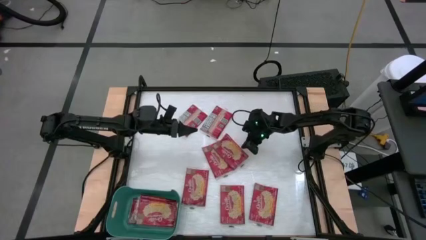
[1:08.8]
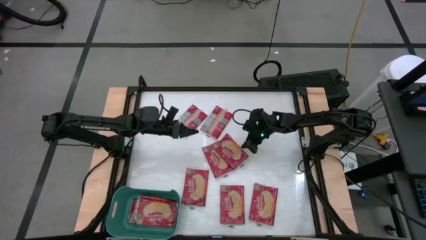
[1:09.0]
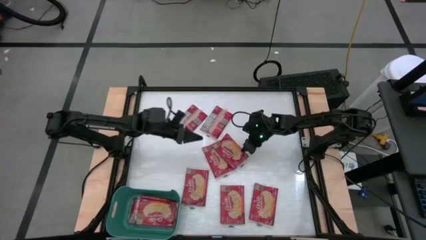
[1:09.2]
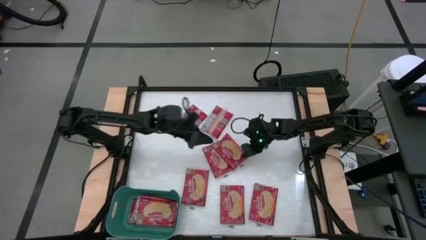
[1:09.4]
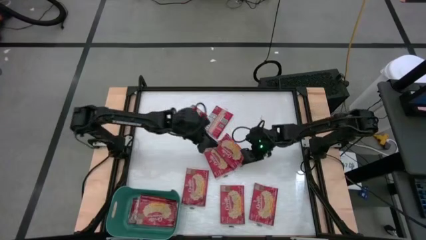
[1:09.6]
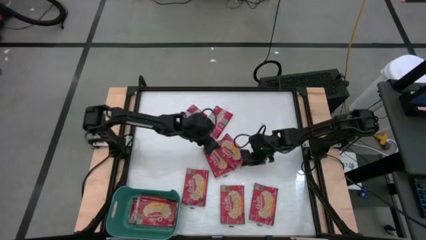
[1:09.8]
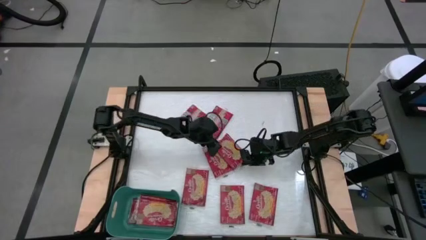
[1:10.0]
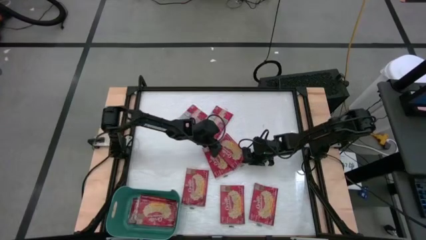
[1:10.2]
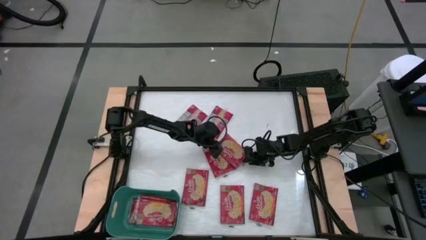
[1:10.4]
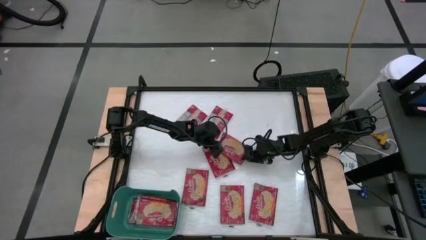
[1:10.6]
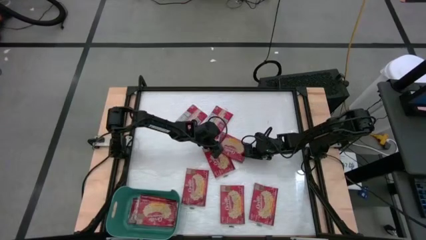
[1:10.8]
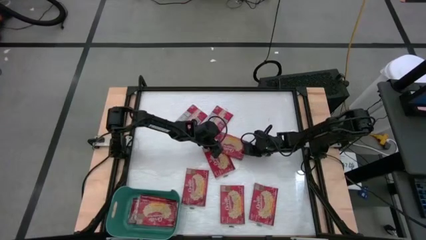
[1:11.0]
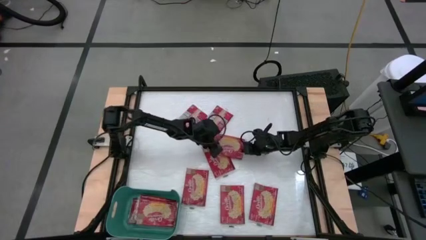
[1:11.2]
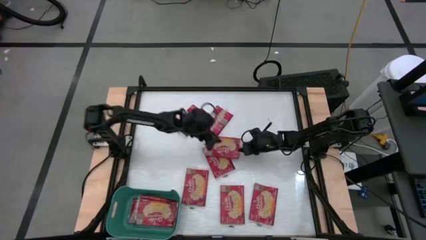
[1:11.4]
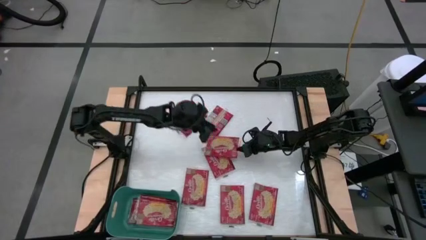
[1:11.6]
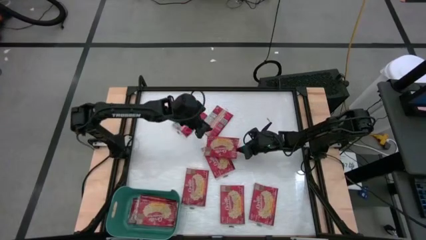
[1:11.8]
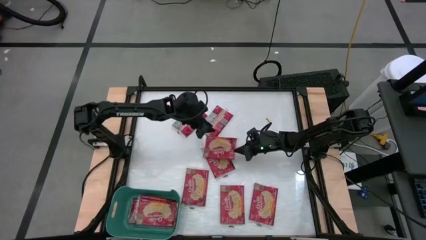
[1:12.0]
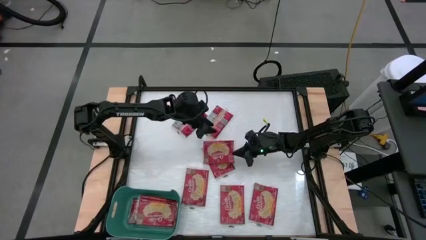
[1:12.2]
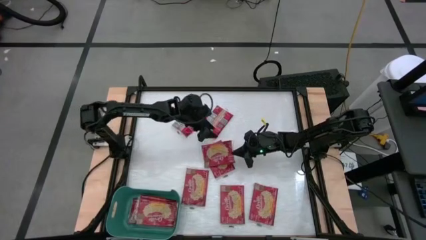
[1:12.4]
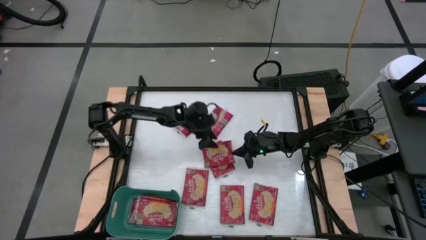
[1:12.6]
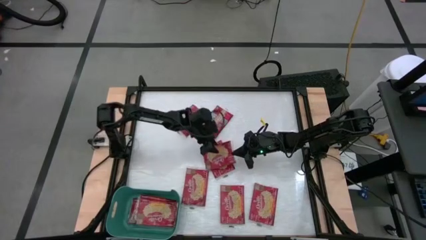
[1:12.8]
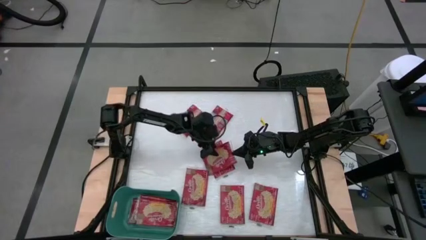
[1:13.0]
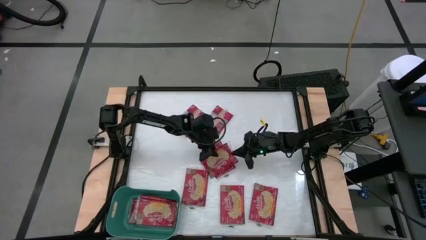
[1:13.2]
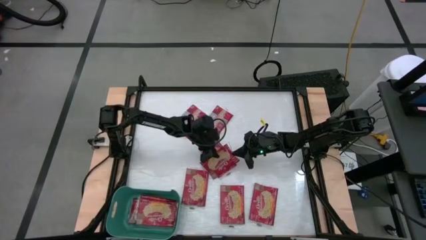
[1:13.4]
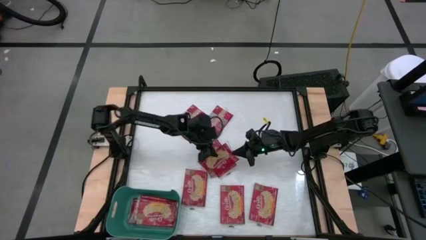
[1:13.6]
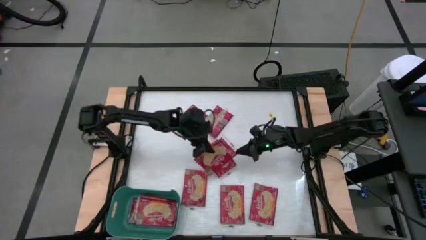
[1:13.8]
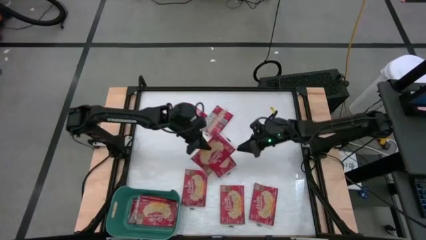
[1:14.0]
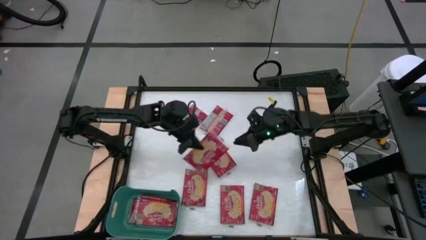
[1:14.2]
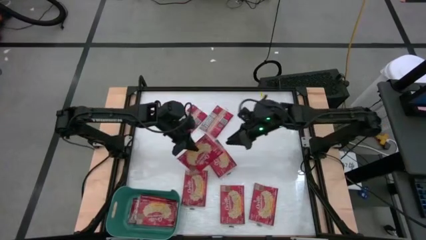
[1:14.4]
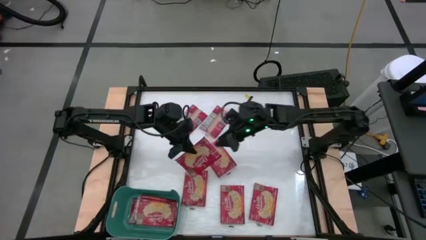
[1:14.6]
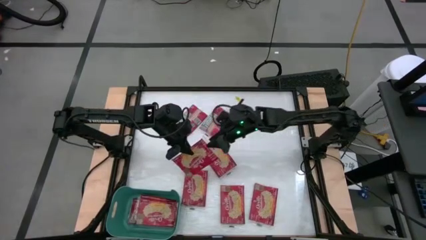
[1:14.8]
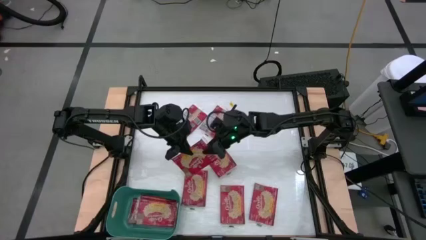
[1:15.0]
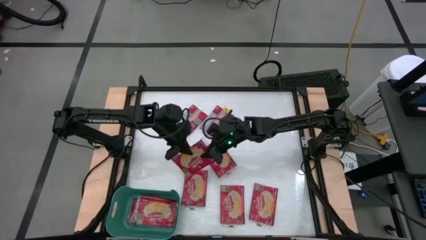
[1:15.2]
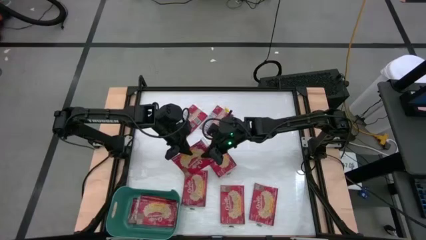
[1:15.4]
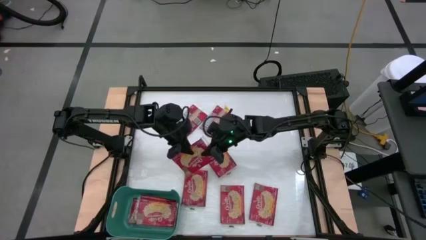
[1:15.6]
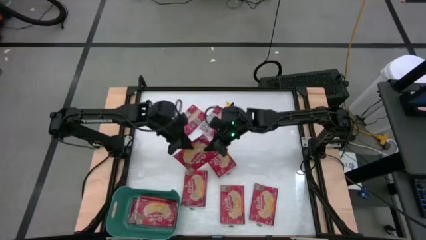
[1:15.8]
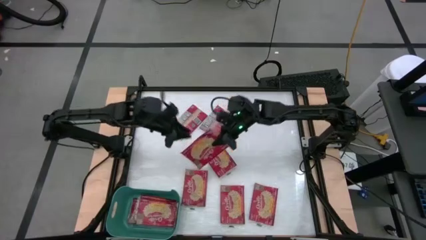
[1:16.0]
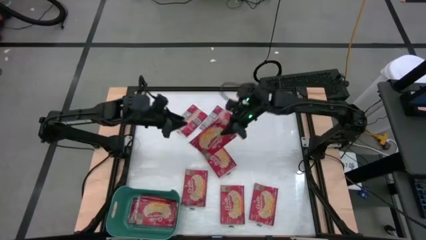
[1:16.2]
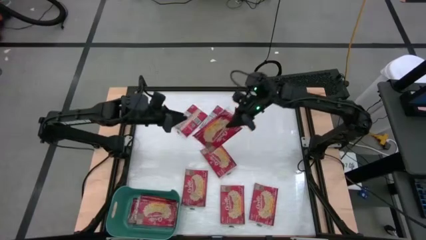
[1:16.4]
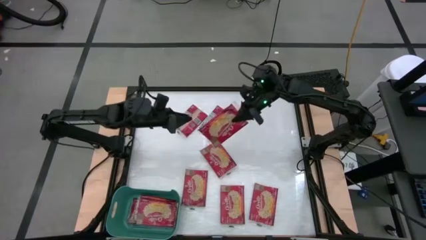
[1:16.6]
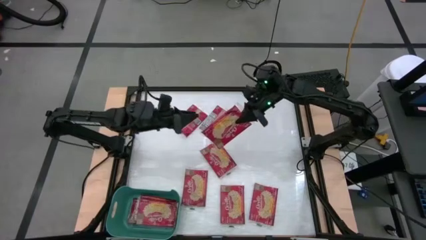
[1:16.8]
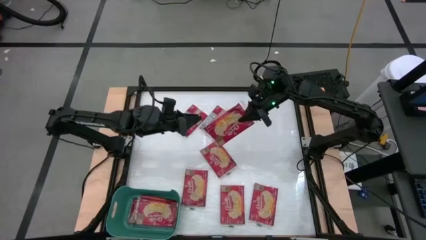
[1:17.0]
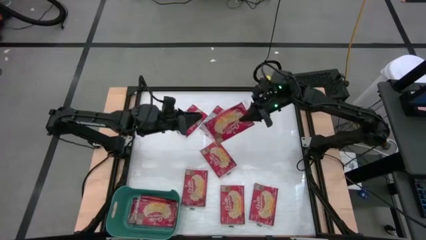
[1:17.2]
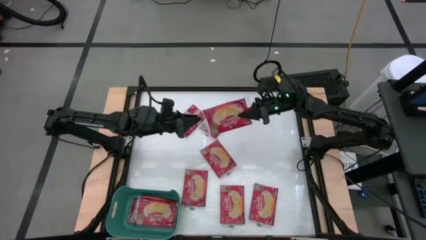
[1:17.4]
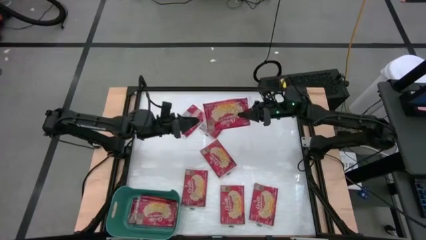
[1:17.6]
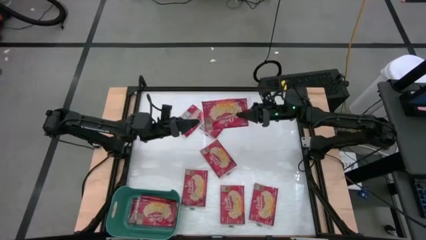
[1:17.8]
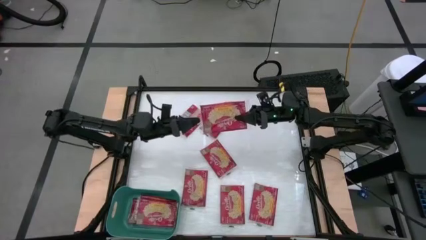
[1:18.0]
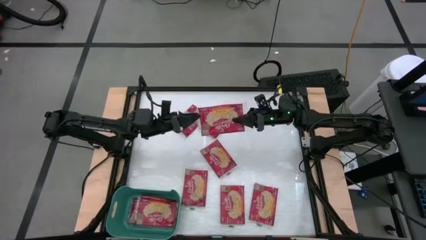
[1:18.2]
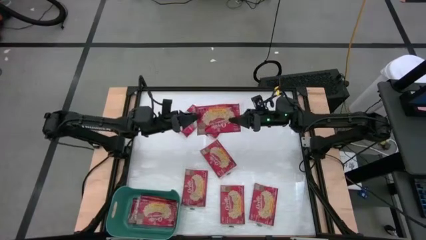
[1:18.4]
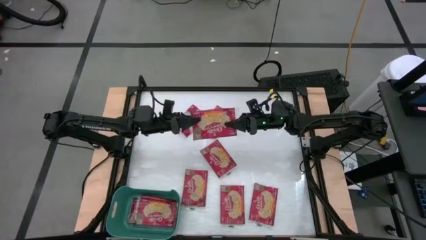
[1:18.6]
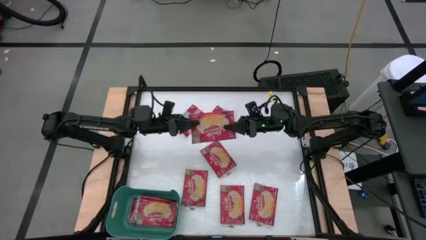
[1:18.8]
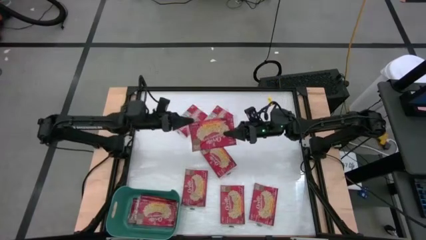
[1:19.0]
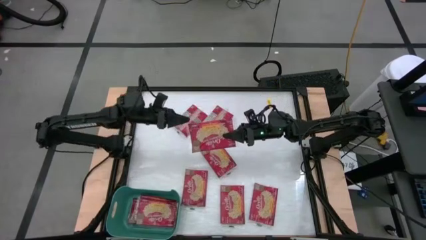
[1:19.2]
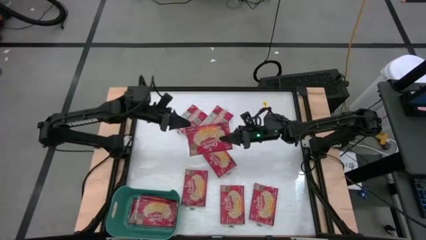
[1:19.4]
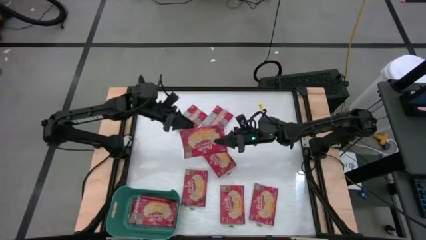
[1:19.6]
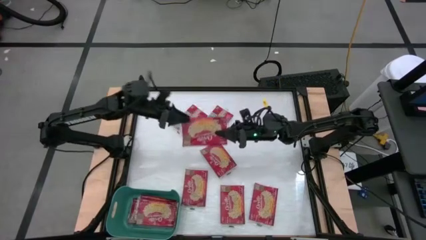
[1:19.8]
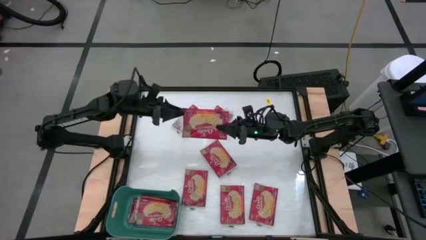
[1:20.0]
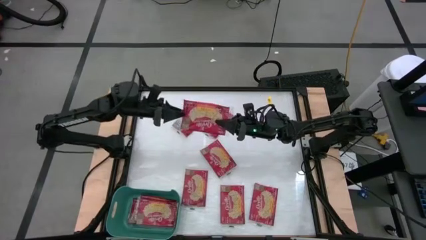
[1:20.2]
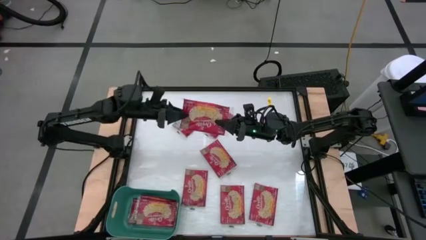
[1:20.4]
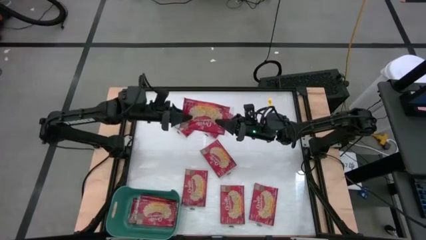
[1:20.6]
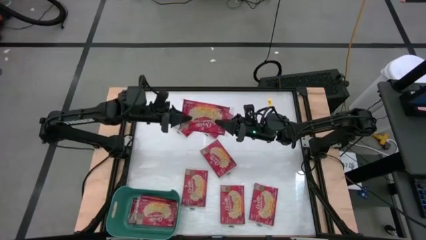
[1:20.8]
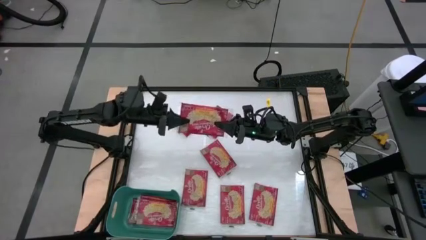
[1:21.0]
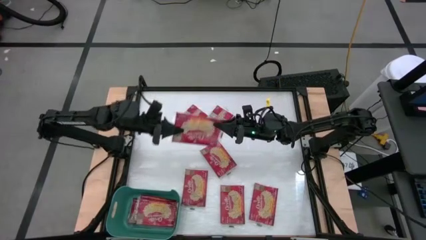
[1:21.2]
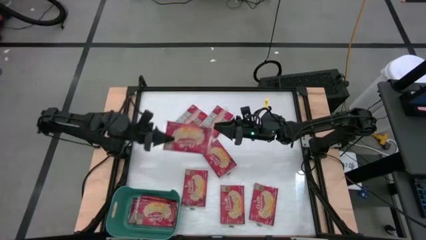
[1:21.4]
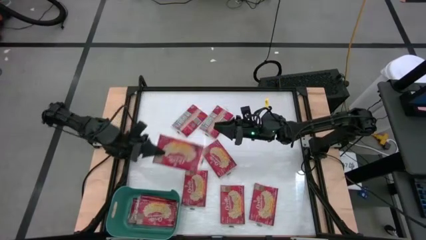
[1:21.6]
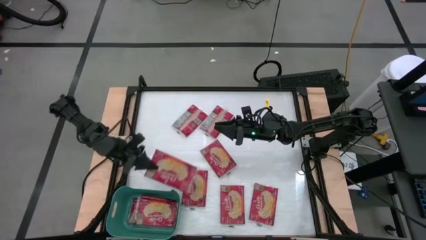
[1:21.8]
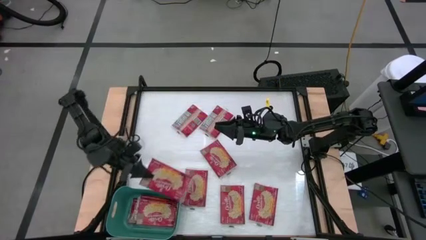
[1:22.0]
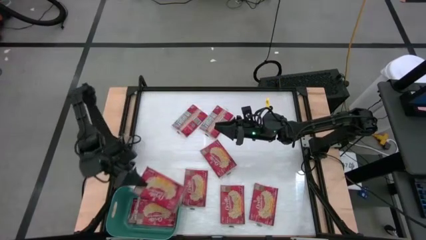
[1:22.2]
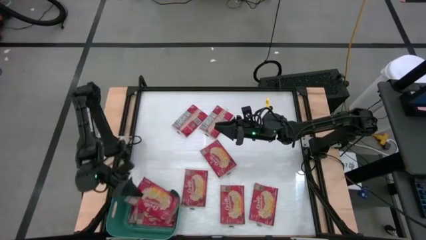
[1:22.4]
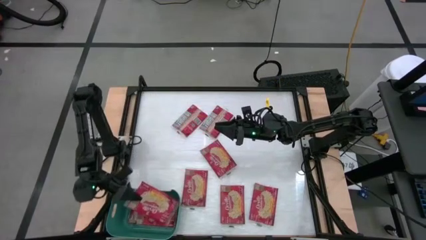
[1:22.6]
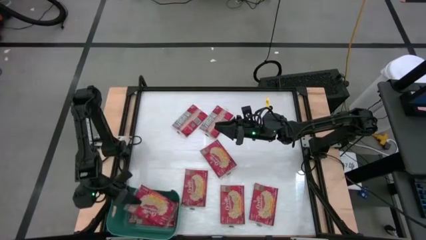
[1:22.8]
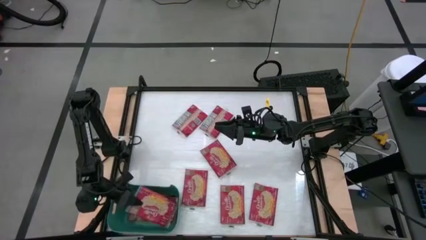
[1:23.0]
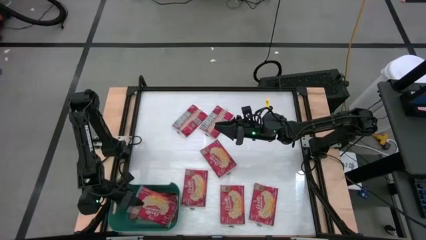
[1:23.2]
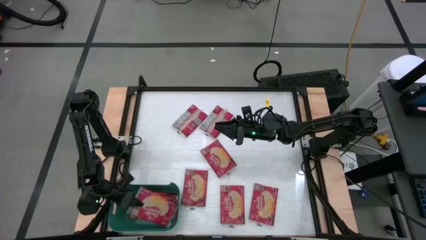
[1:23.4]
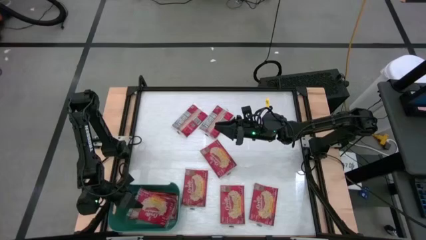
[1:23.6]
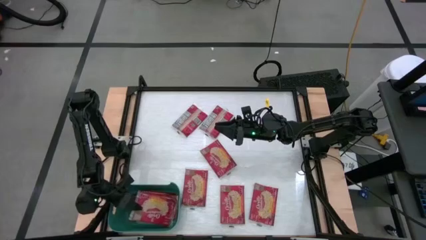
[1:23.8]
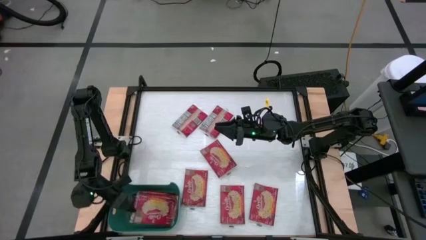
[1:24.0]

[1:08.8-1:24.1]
Task: Sort popcorn bags into baskets
Put the red popcorn bag into the green bin
